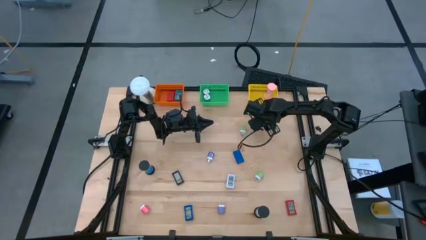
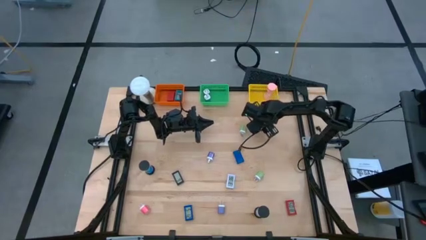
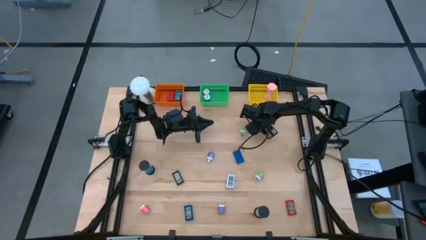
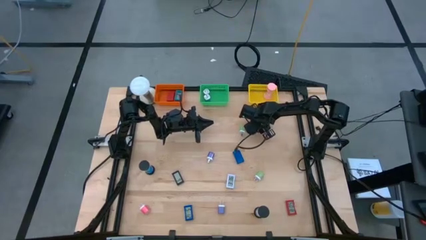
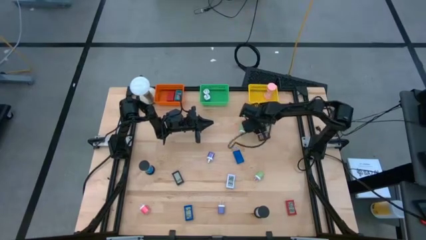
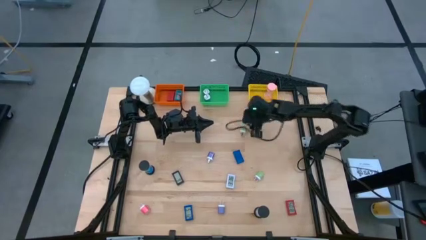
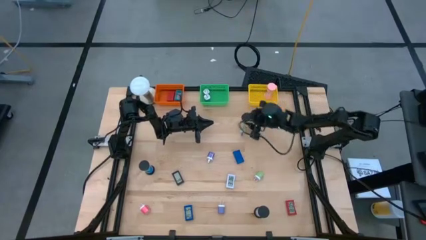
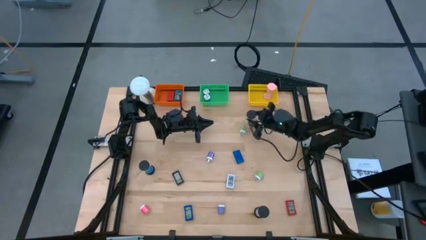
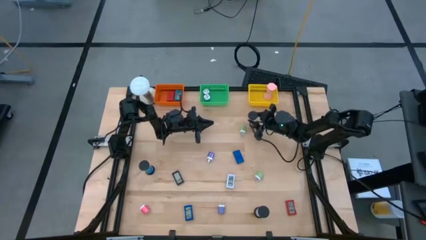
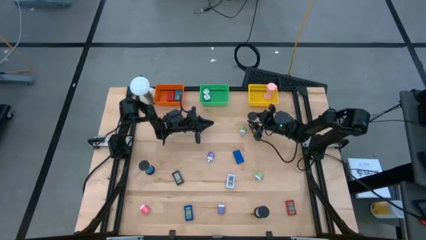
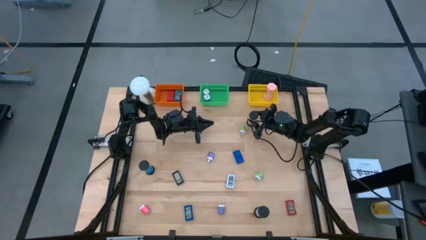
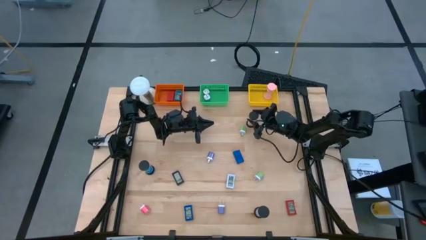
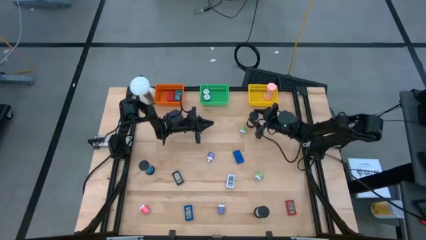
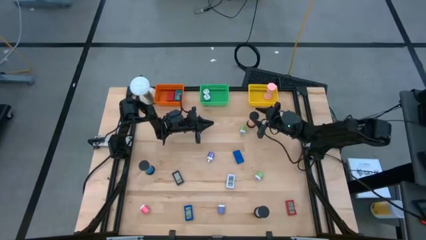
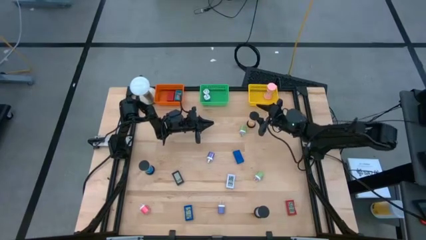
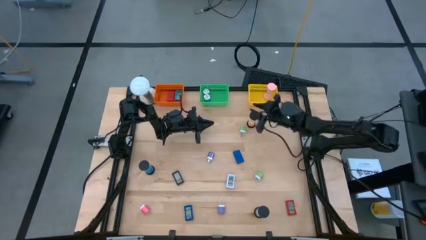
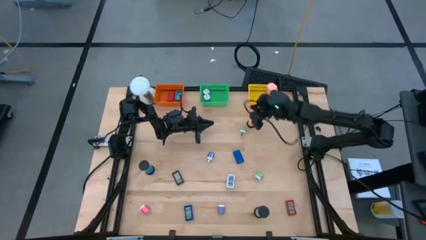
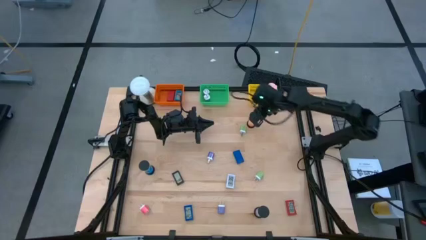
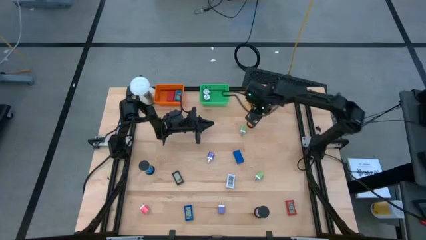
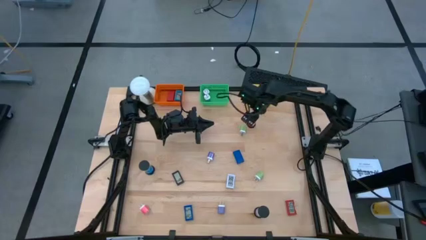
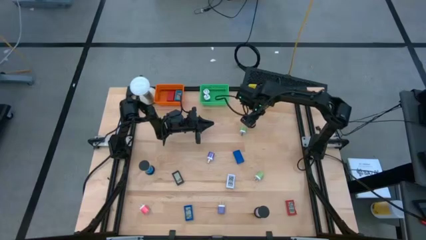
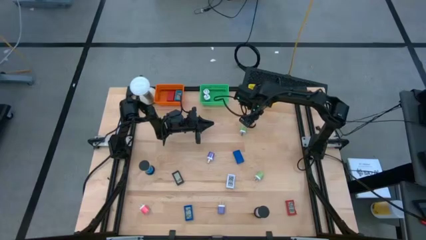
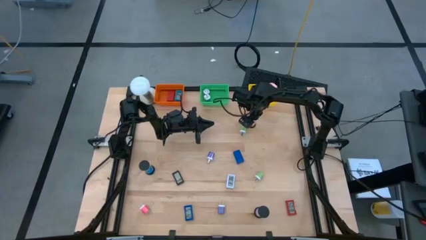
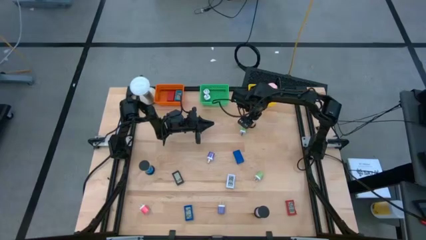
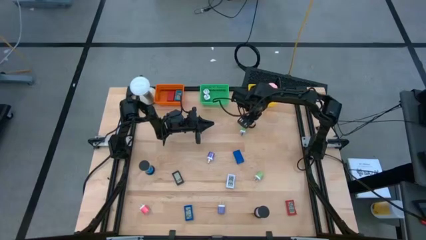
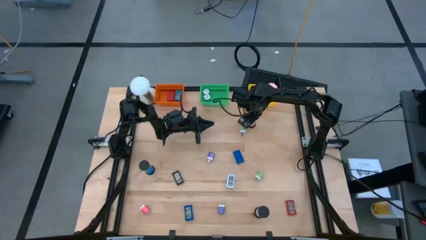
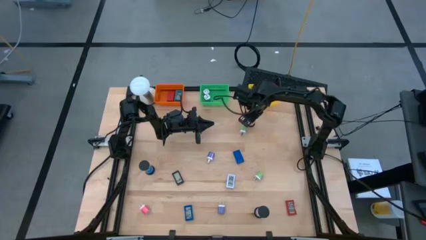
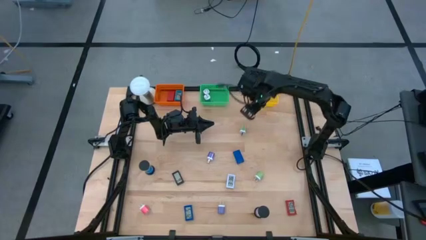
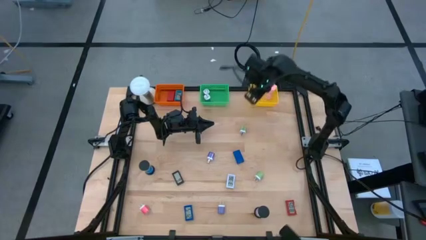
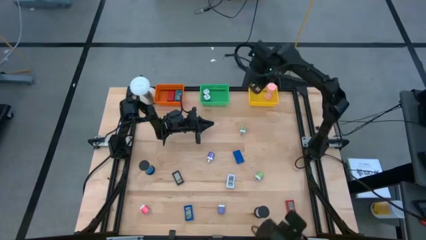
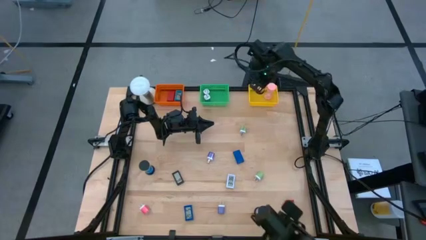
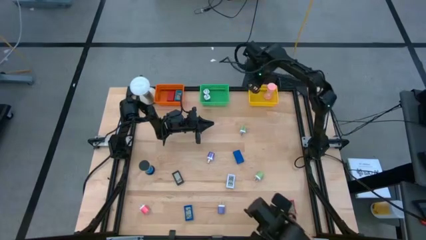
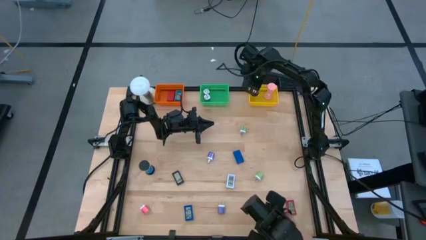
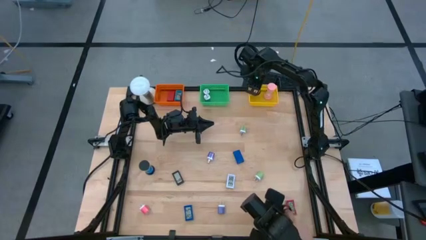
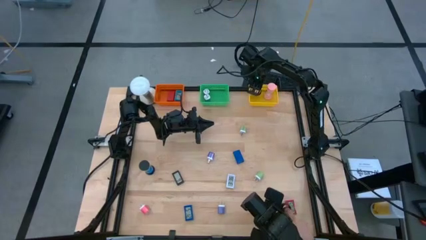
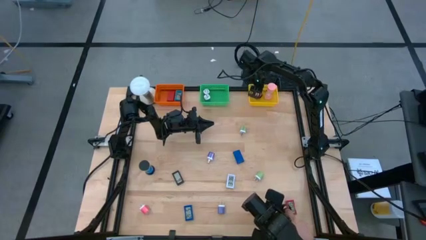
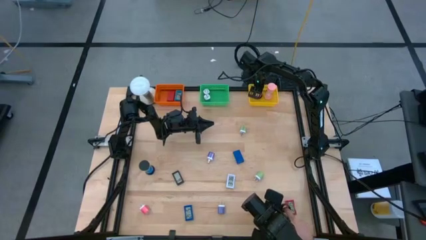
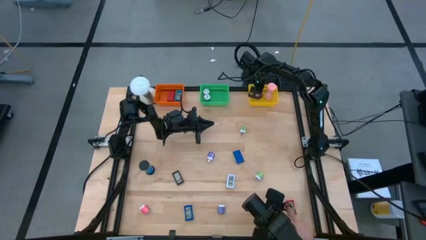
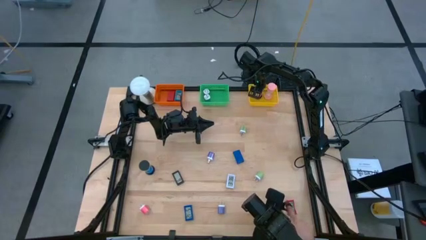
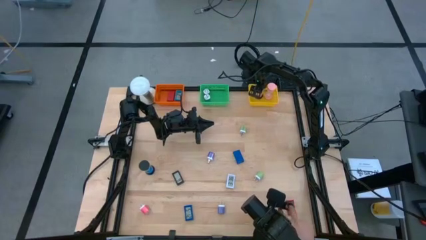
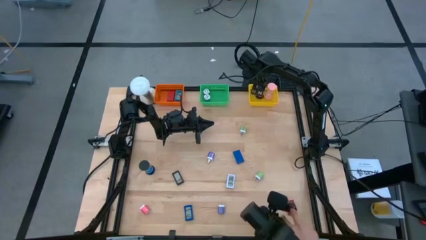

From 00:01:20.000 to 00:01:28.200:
Task: Pick & Place Office items
Put the orange hourglass into the yellow basket

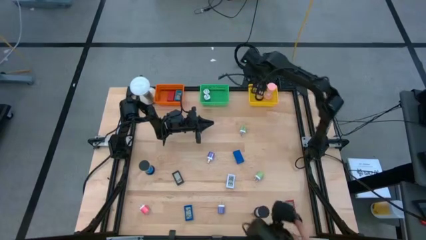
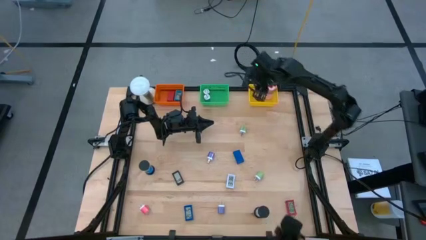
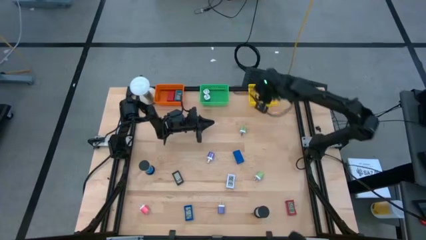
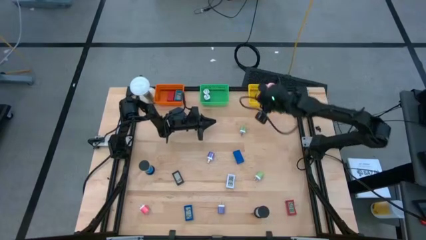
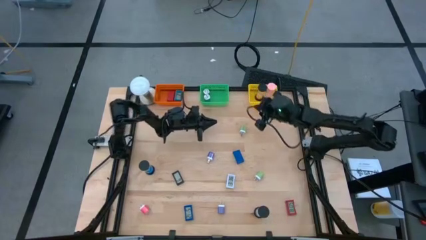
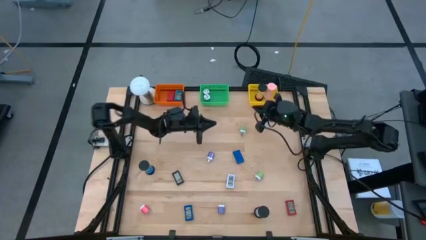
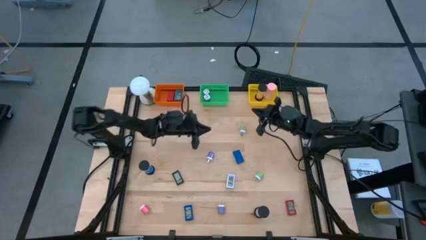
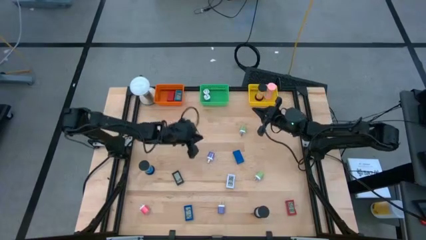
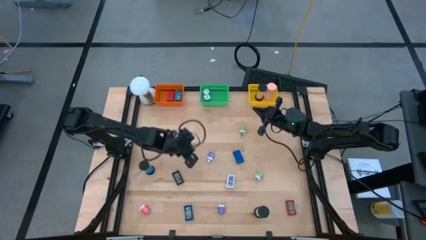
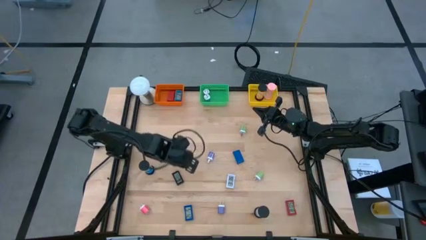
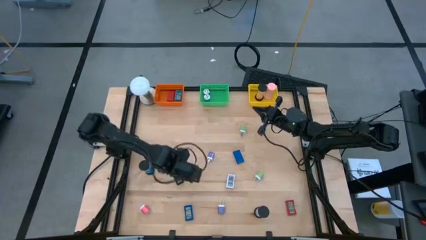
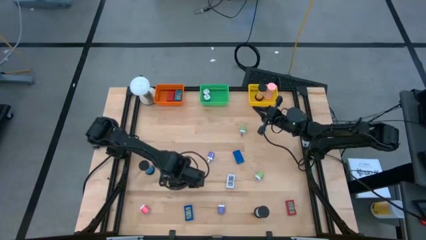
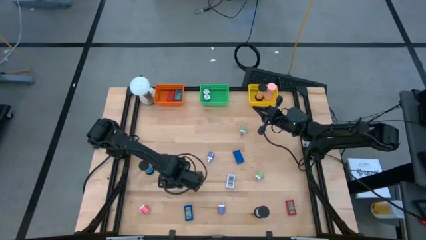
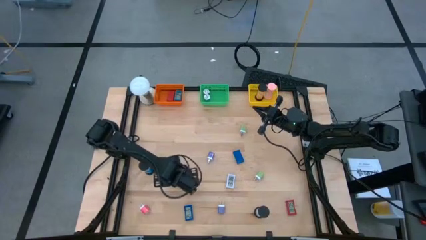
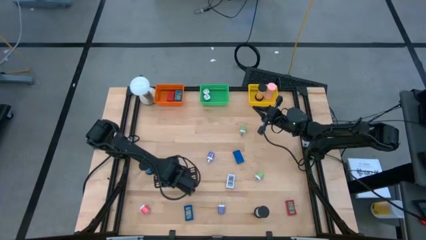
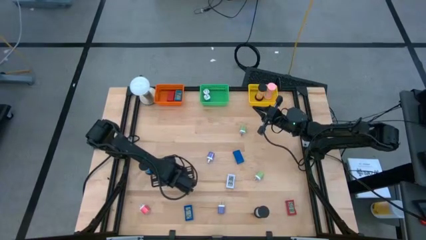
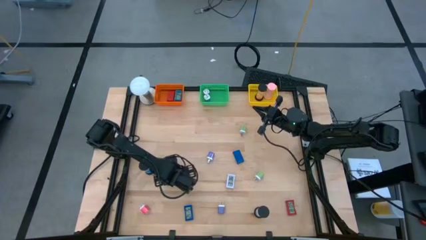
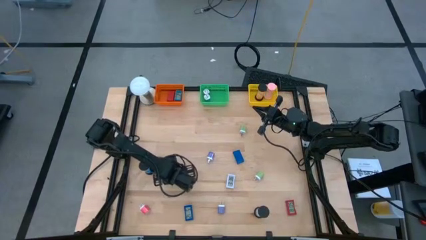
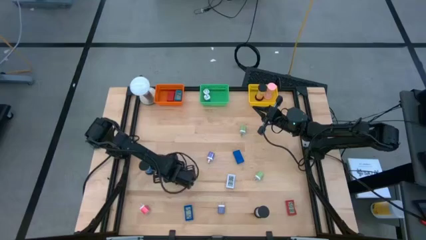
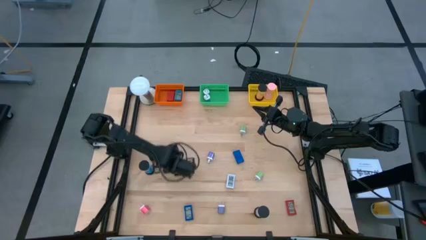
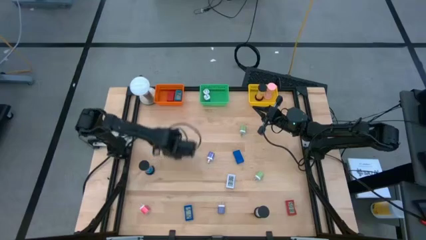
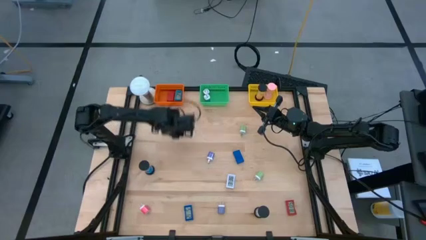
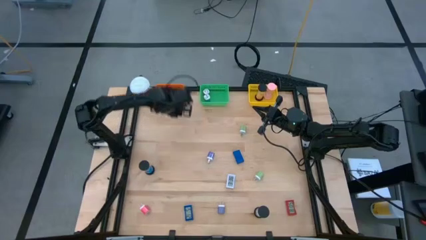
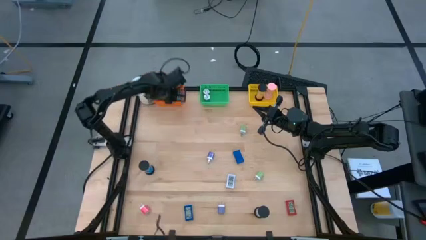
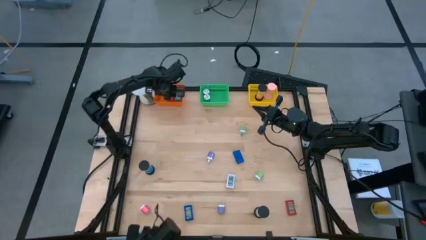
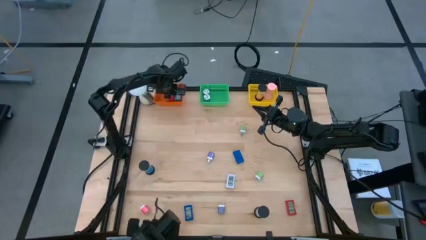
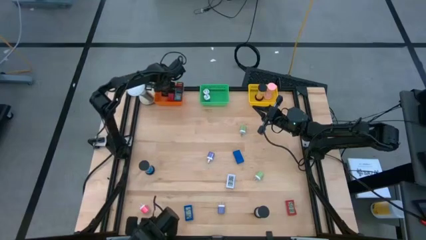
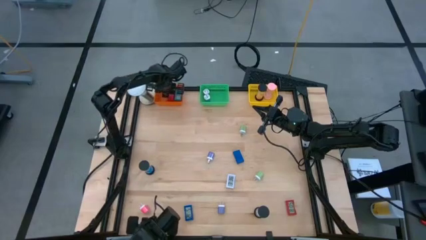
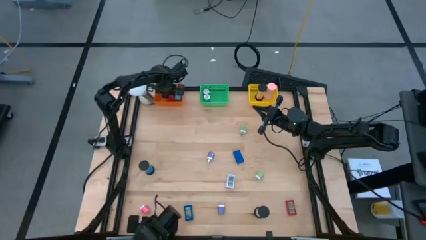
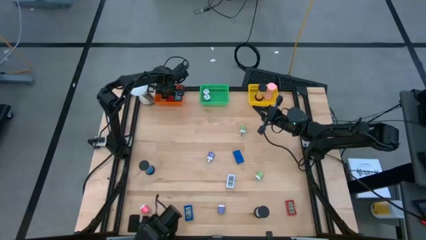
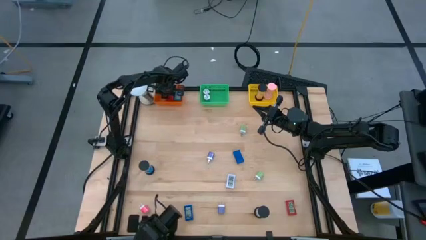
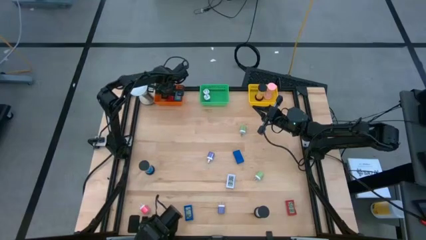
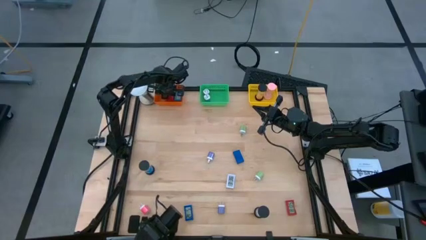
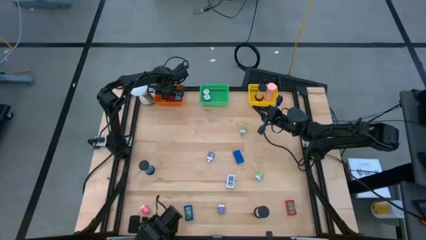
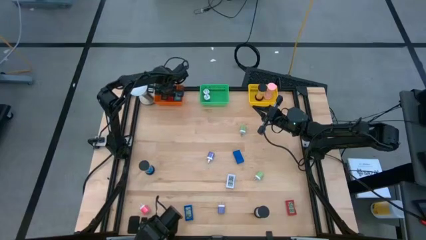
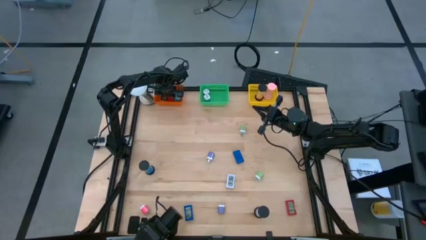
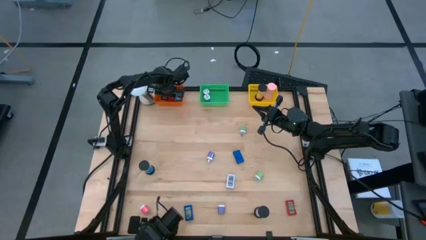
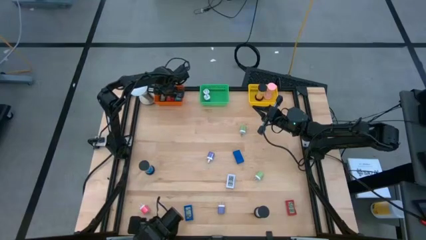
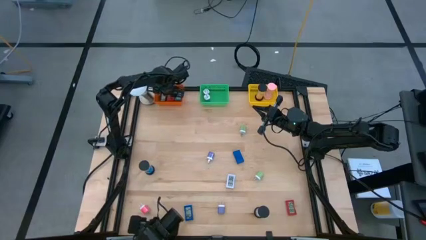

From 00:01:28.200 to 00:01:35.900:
Put the black digital clock into the orange basket
